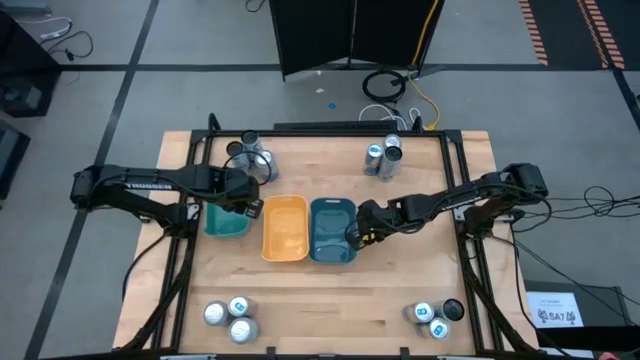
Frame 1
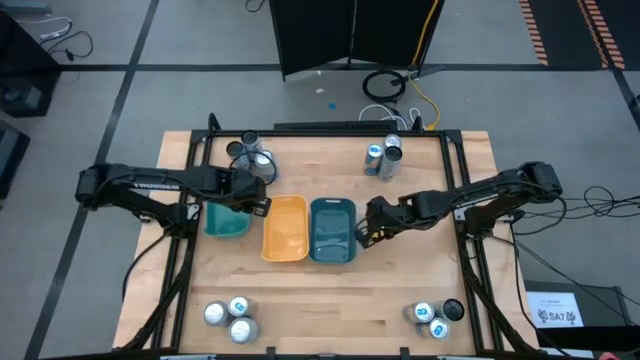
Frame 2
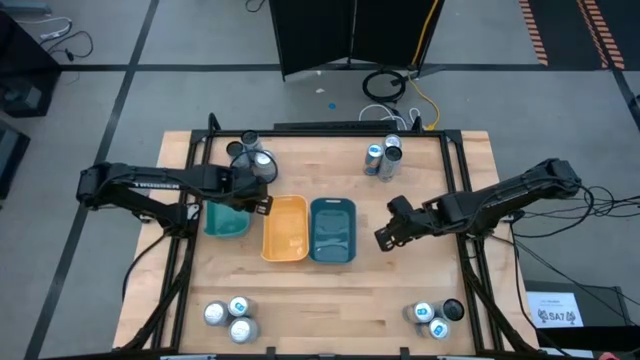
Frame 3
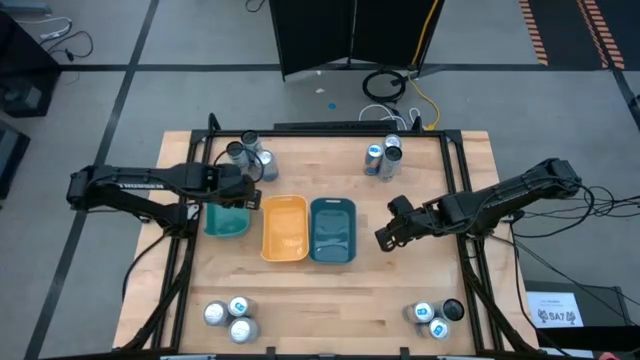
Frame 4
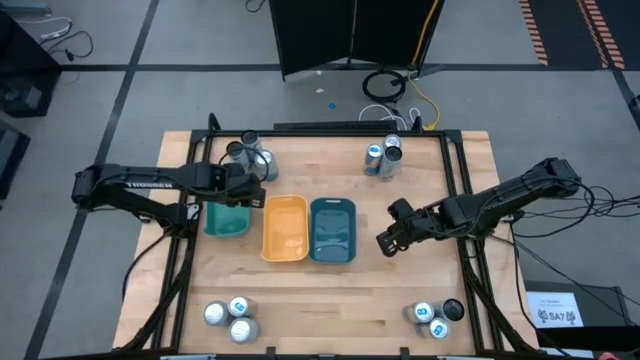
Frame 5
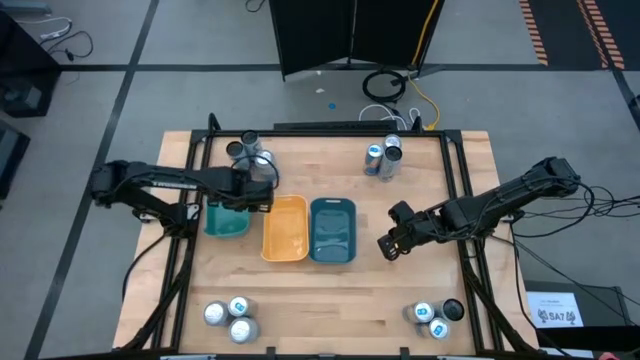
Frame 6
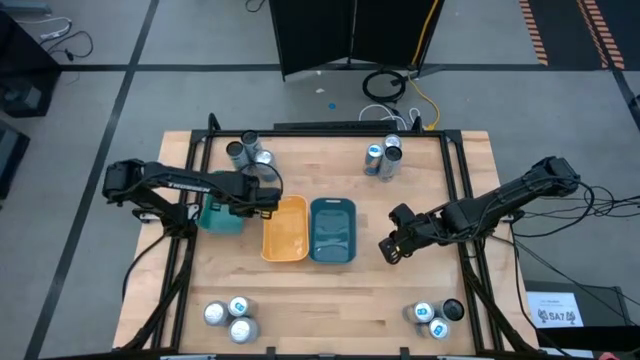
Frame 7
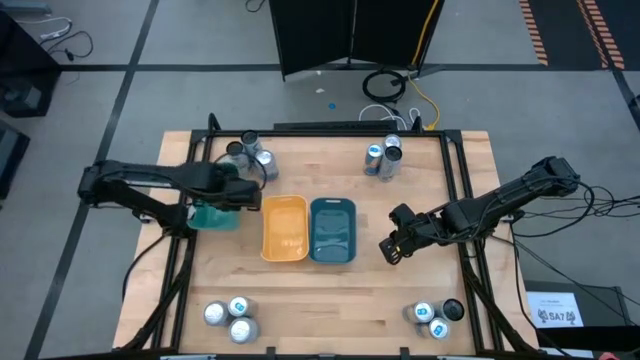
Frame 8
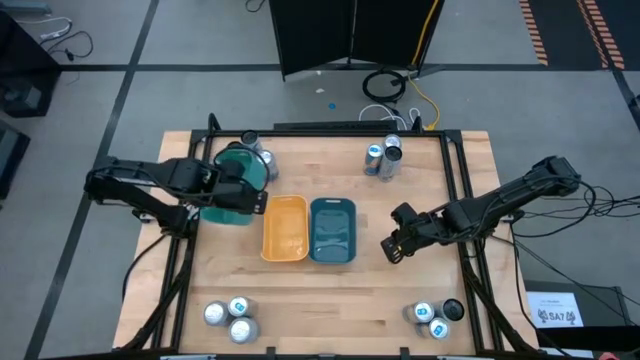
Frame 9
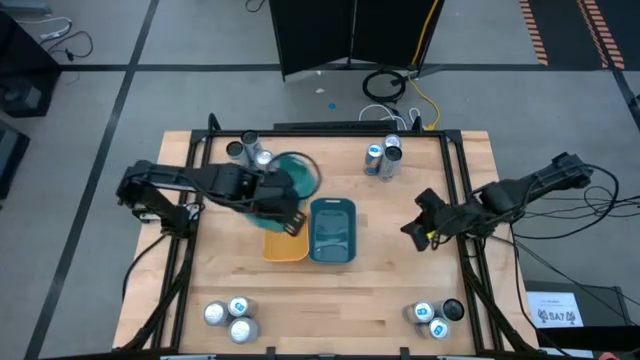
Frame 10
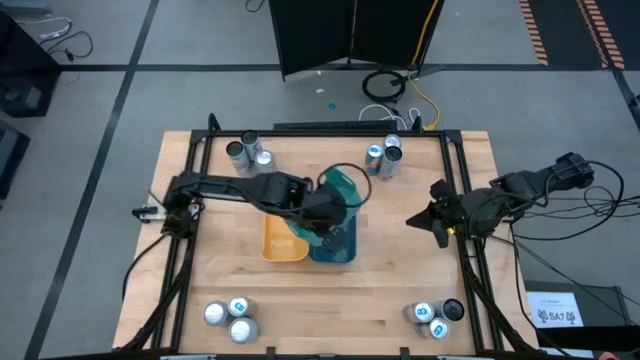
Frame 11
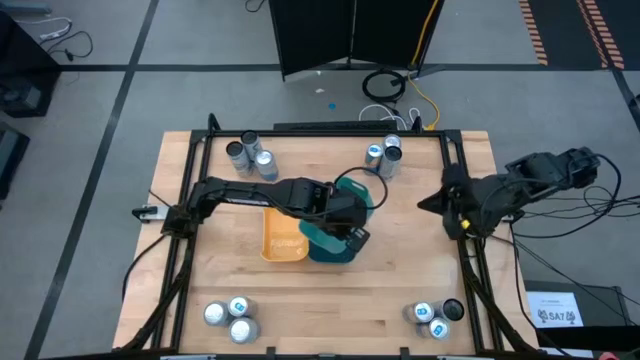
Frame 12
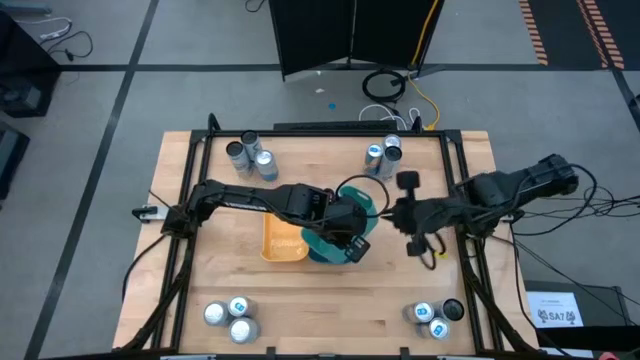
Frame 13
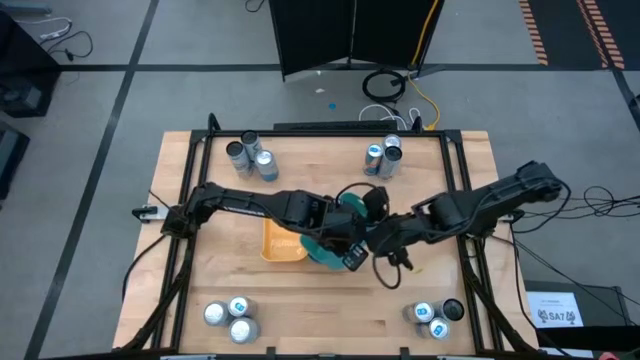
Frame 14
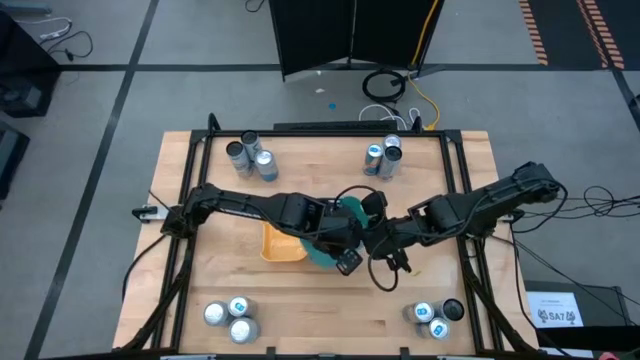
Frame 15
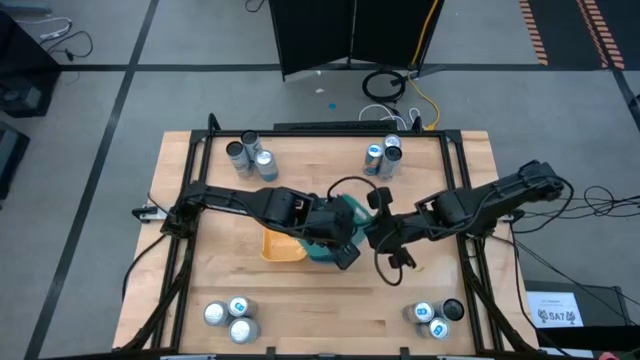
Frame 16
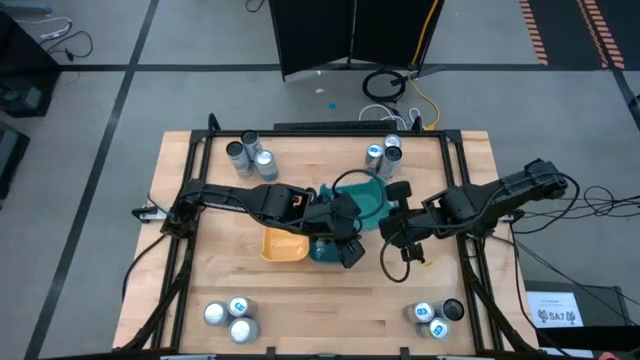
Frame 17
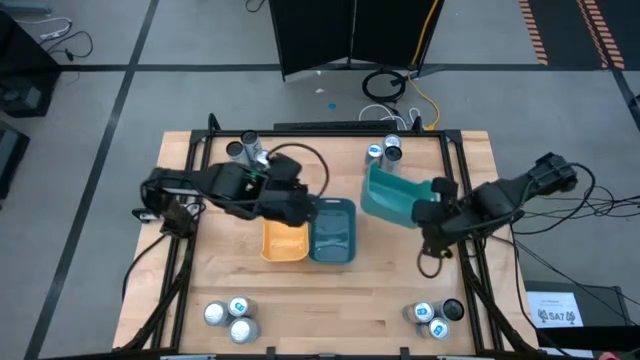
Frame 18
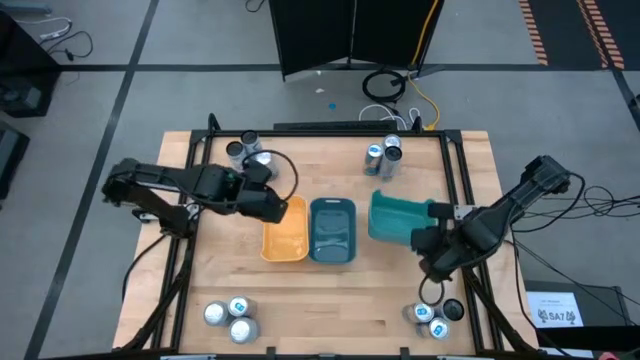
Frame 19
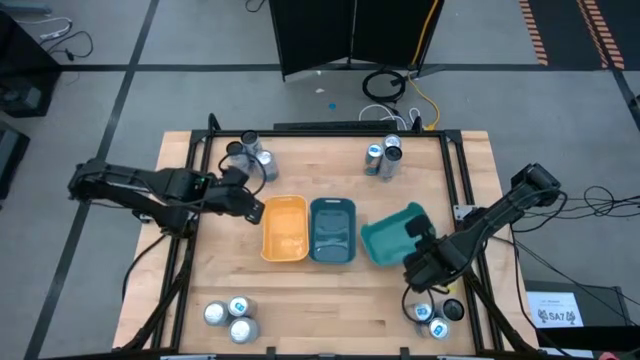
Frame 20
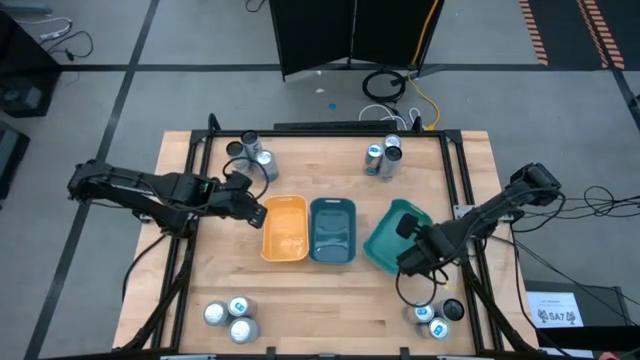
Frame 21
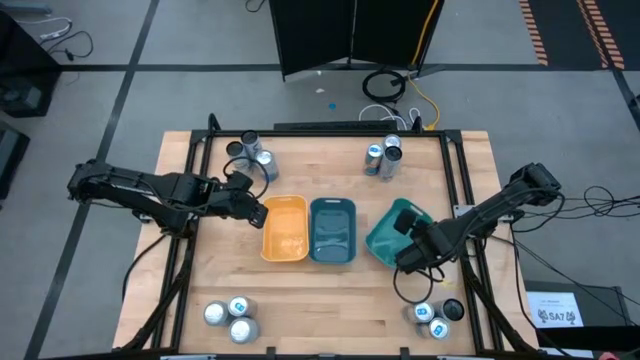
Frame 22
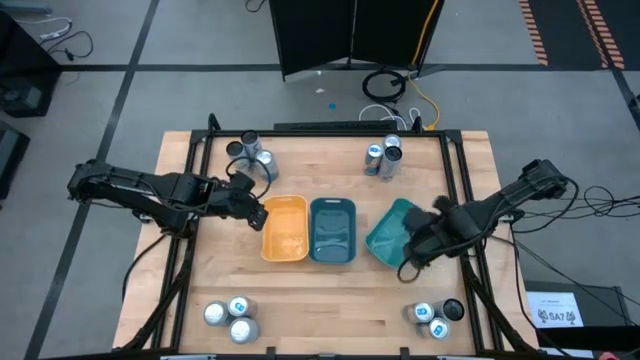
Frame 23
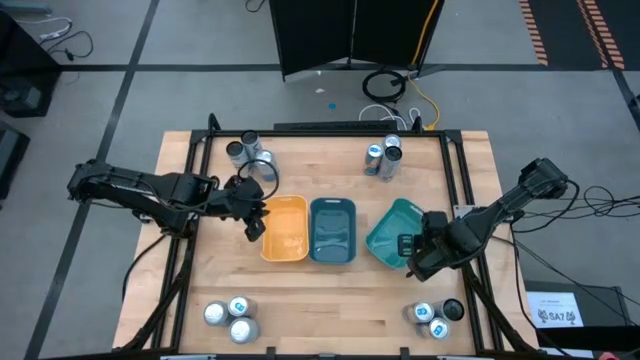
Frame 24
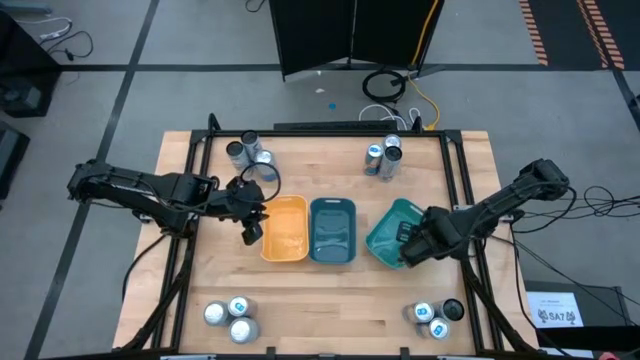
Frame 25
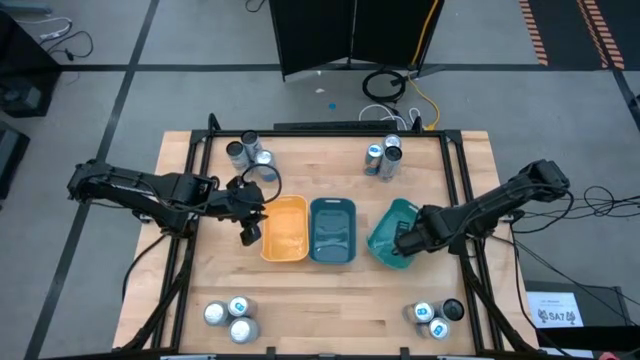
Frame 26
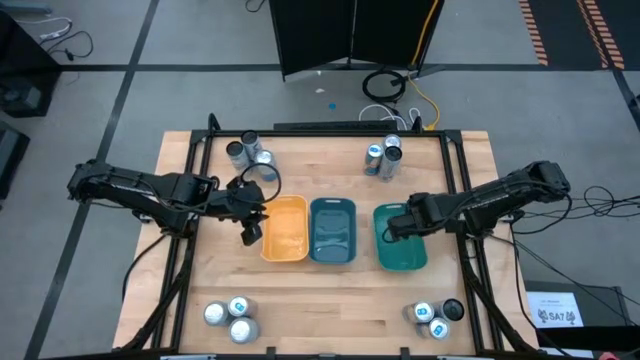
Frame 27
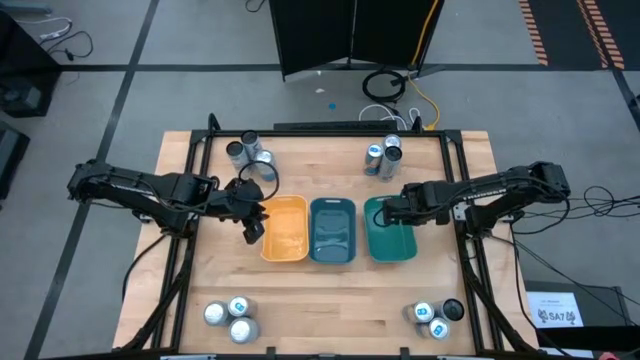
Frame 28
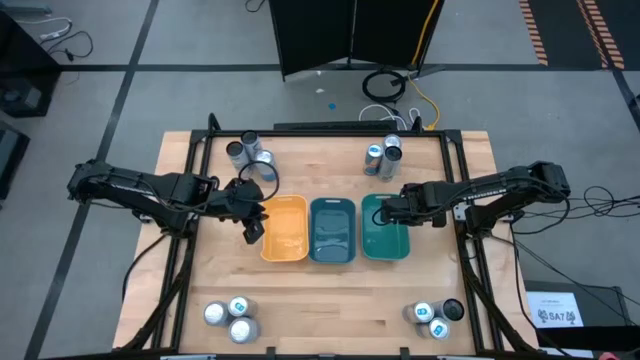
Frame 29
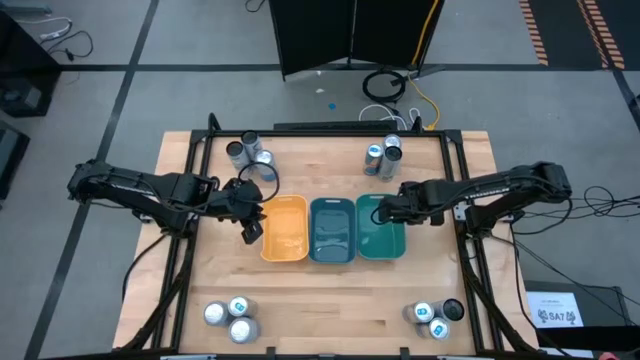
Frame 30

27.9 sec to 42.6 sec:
Task: Sort soda cans
Move the green bin to the right side of the blue bin

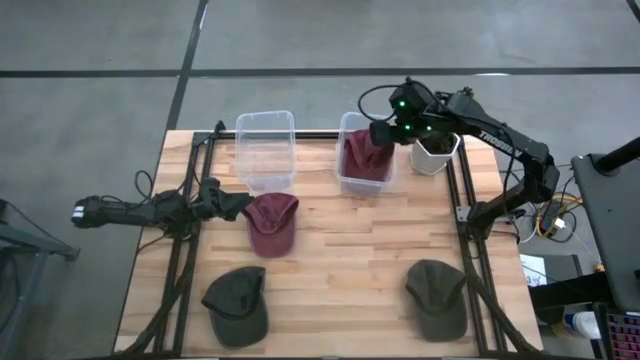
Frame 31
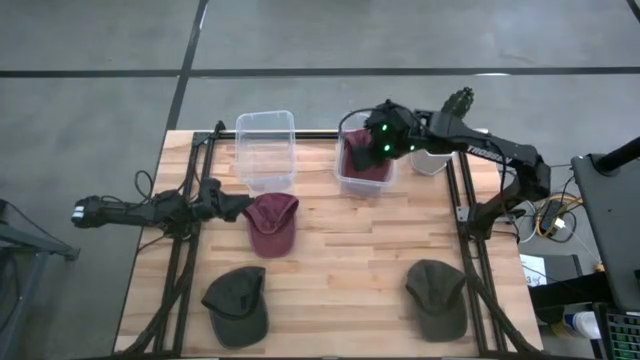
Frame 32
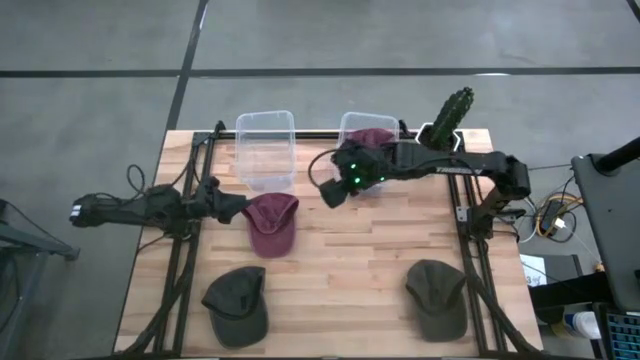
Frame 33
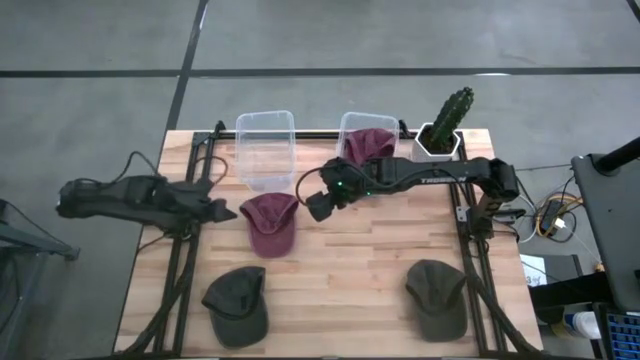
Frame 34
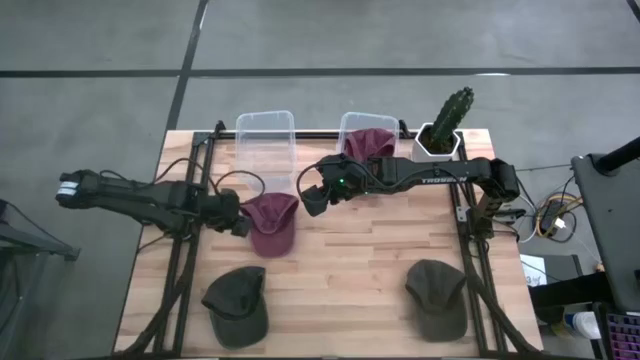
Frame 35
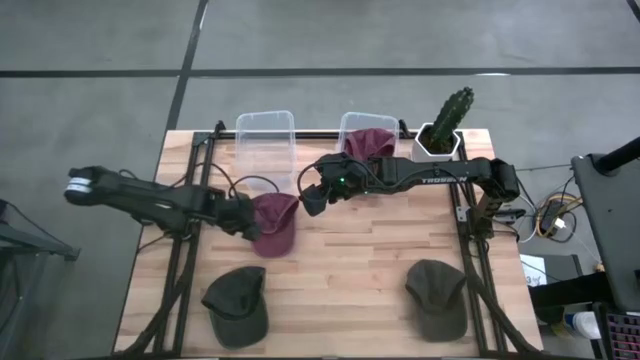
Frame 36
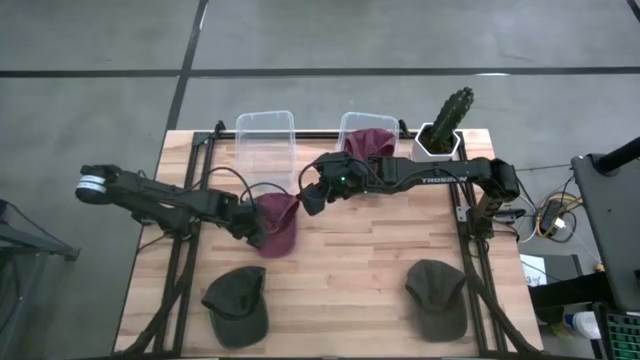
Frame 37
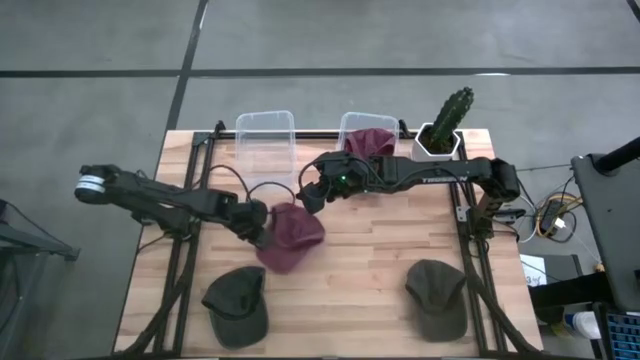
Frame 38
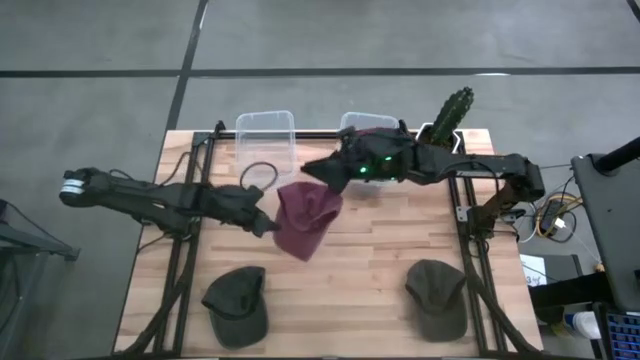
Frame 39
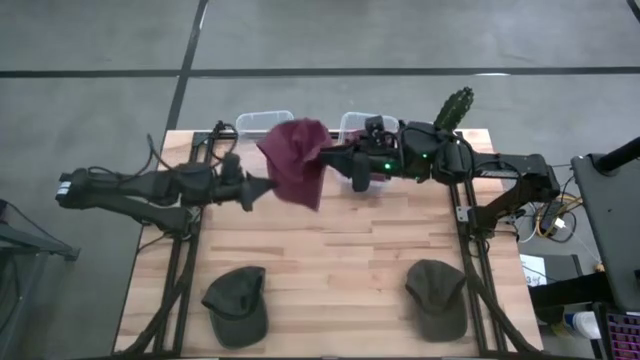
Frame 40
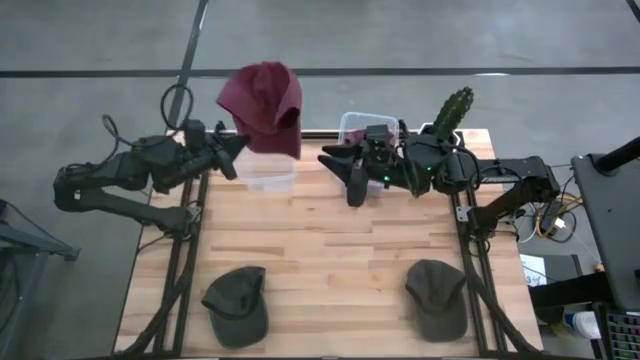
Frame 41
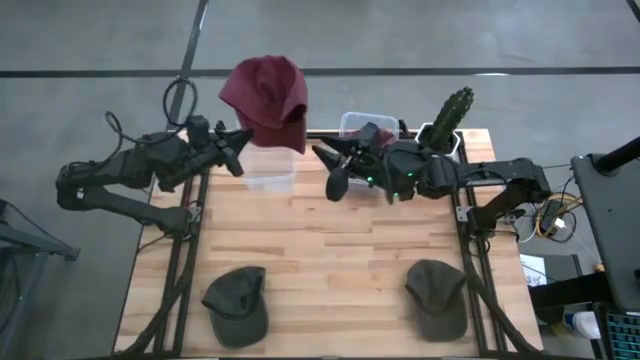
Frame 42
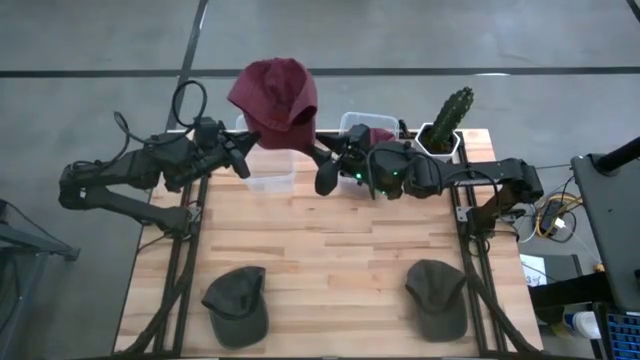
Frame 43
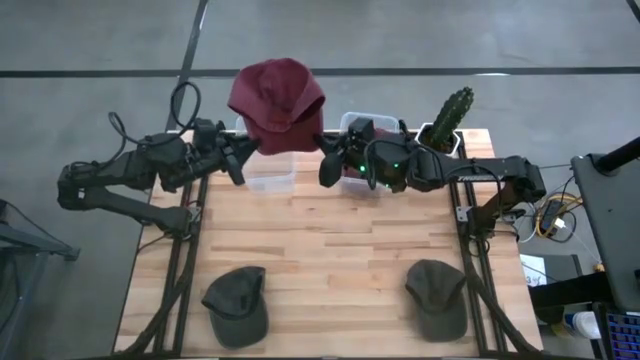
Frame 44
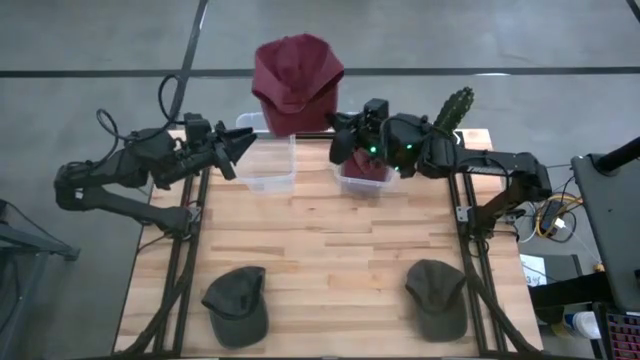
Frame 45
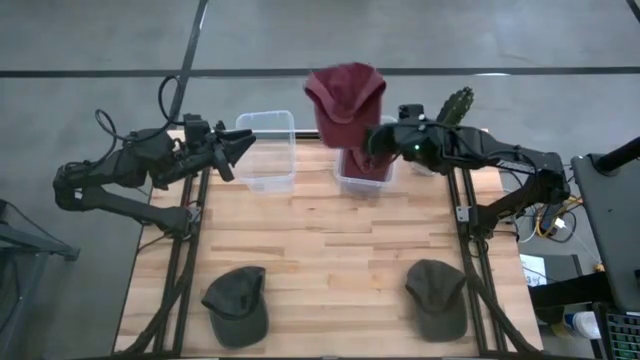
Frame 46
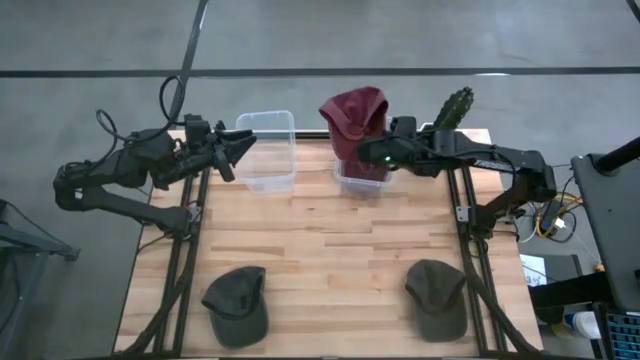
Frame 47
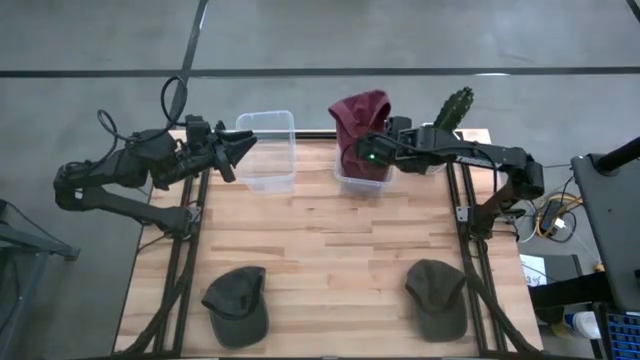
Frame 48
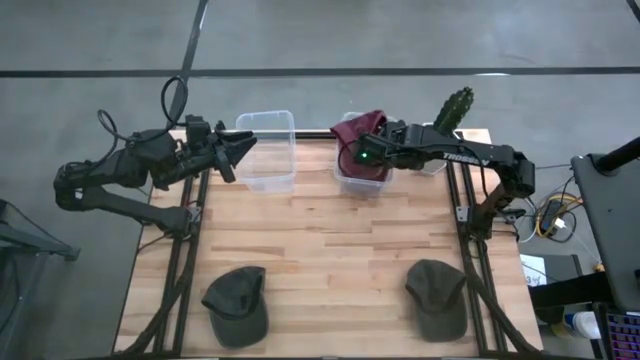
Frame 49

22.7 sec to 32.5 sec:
Task: Pick & Place hat
Put the red cap into the right transparent bin
